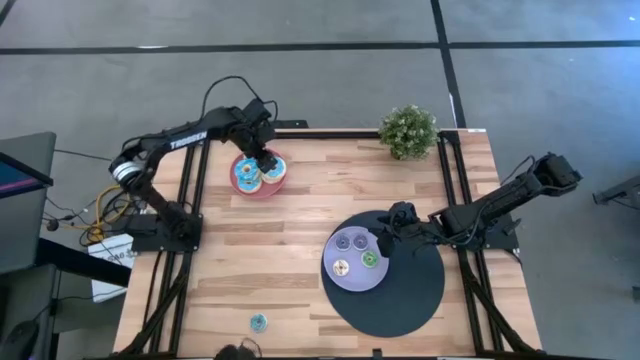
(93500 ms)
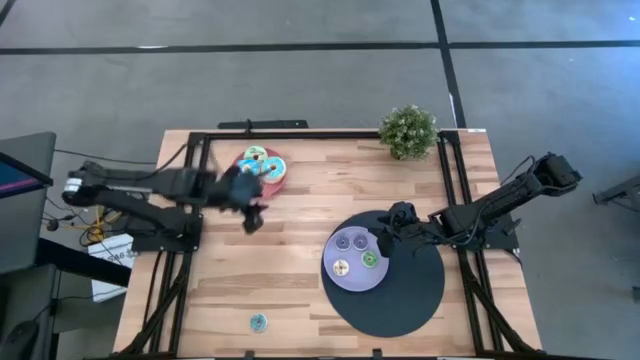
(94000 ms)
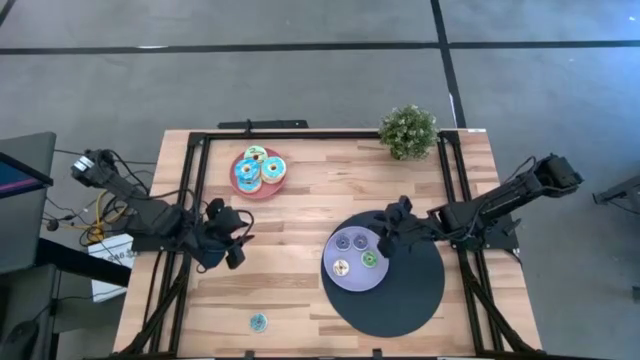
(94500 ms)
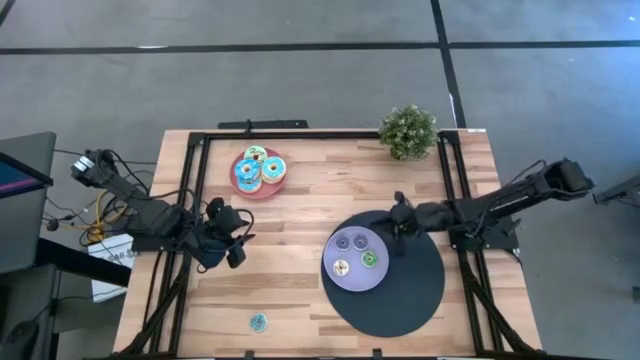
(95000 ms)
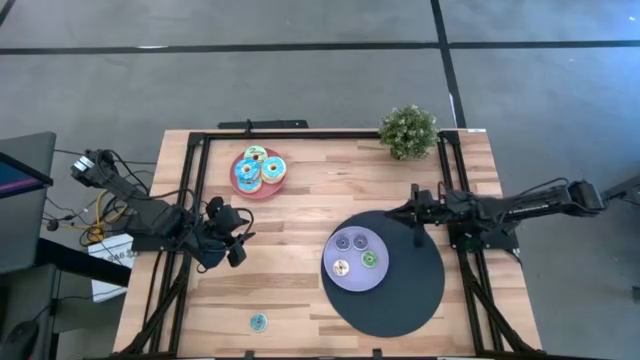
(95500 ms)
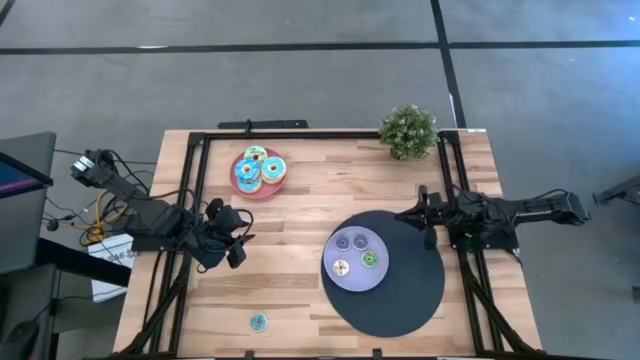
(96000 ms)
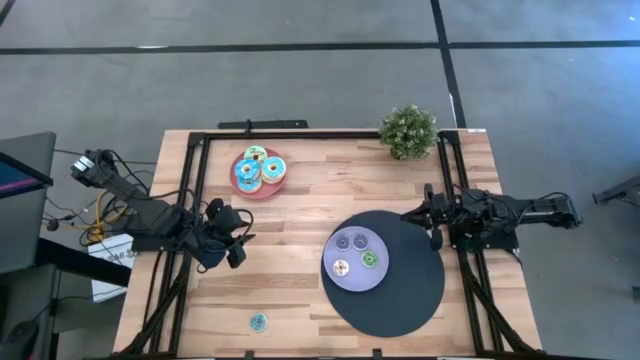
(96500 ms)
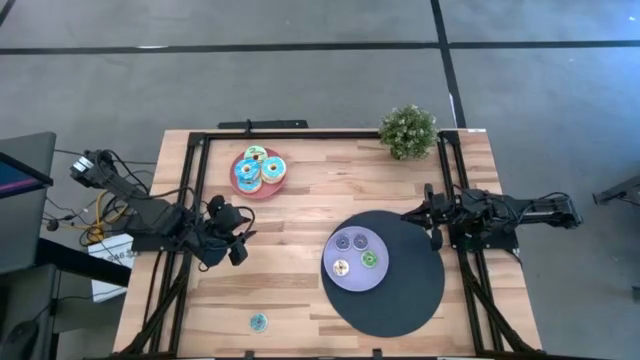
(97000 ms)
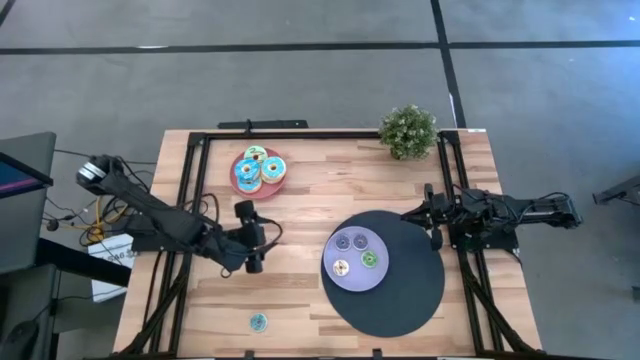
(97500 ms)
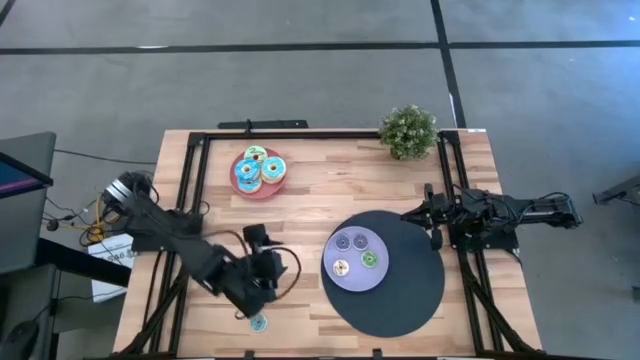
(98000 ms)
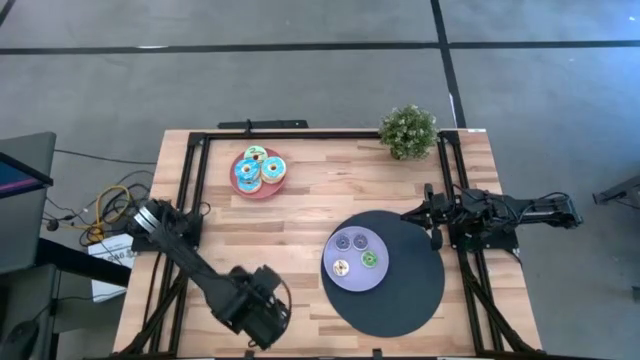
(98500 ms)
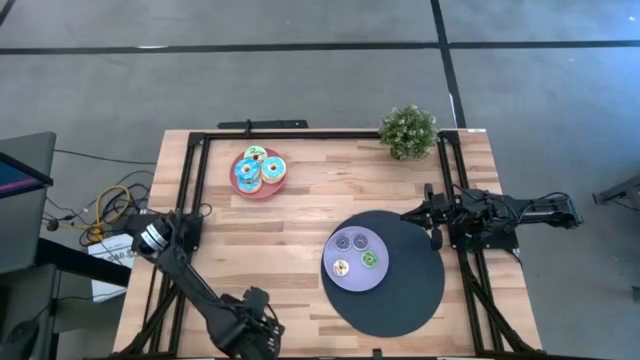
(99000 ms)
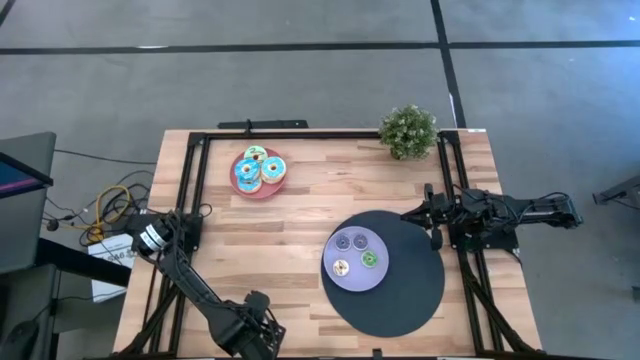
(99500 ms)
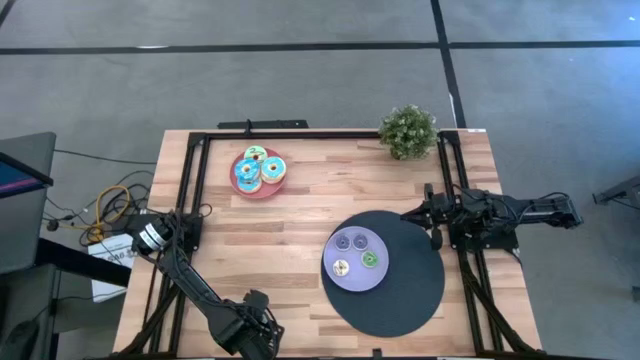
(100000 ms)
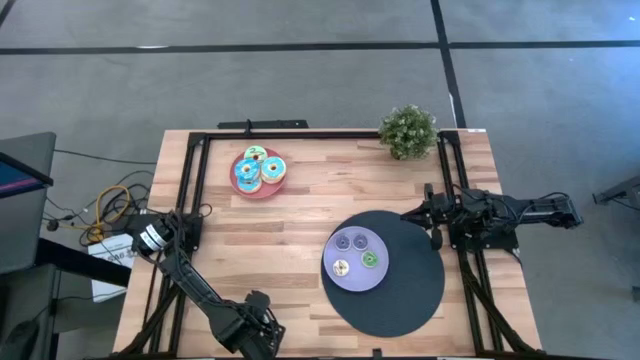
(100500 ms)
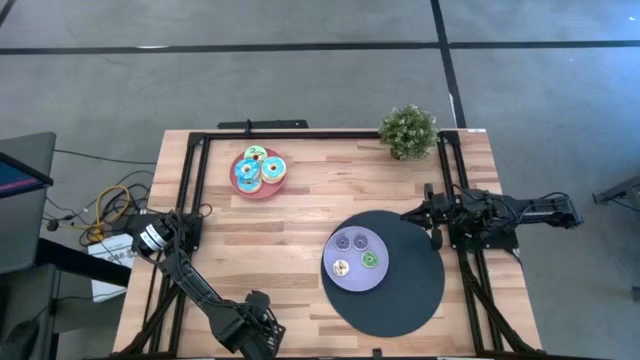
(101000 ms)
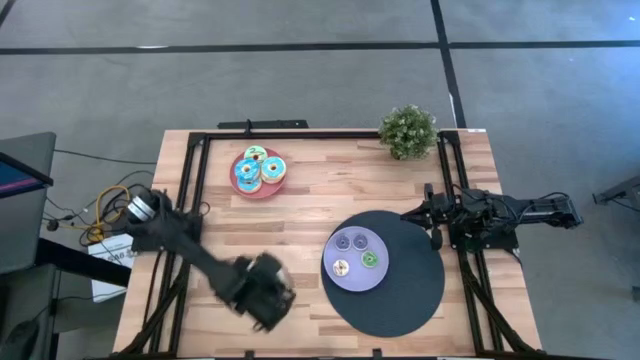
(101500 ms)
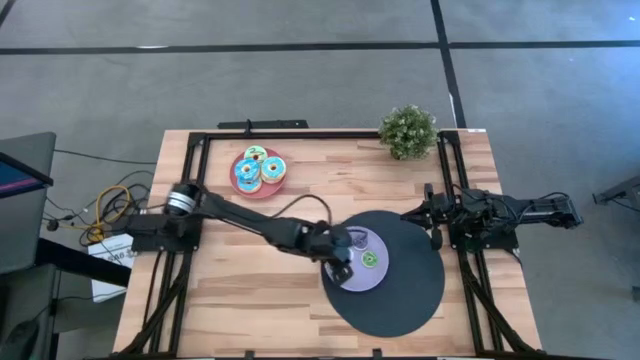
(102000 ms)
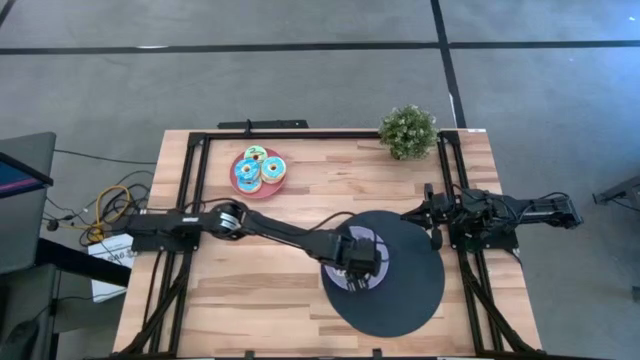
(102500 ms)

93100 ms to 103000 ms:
Task: Pick & Place donuts
Put the small blue donut on the purple plate

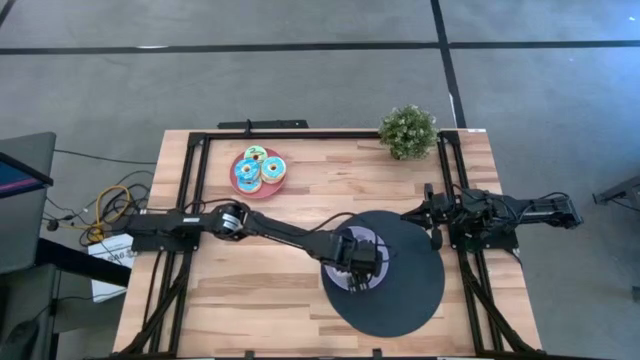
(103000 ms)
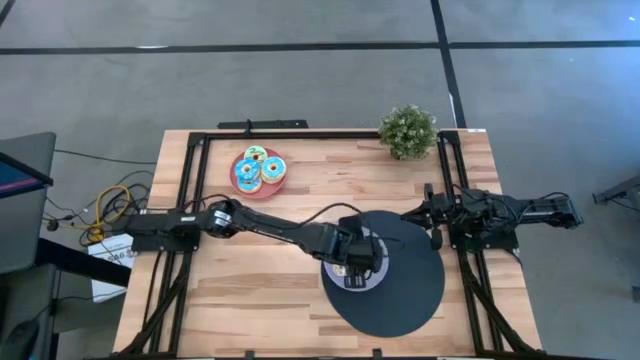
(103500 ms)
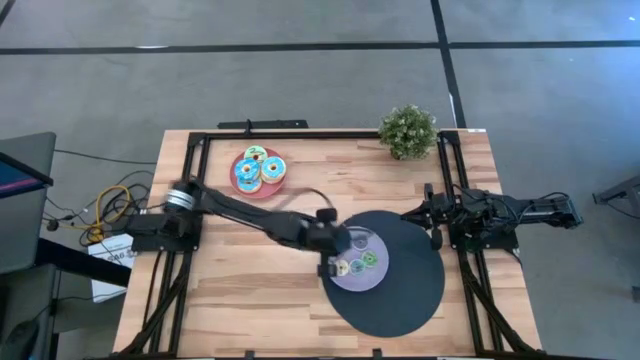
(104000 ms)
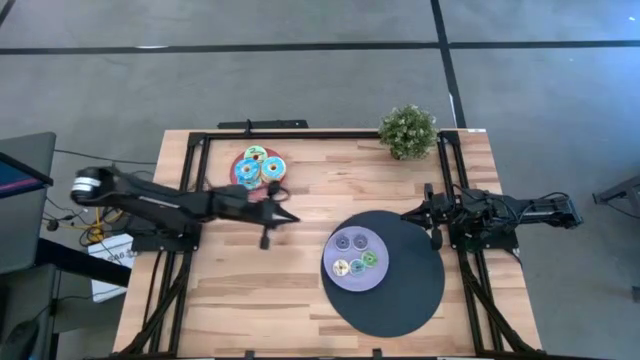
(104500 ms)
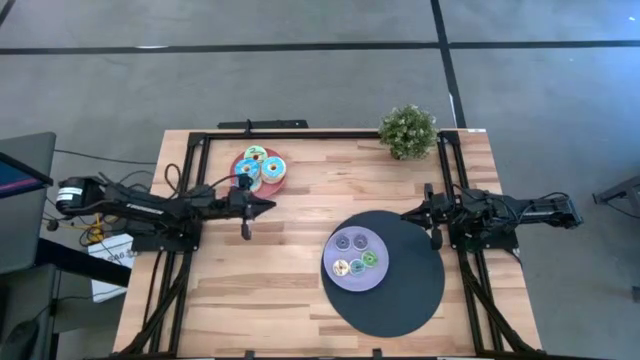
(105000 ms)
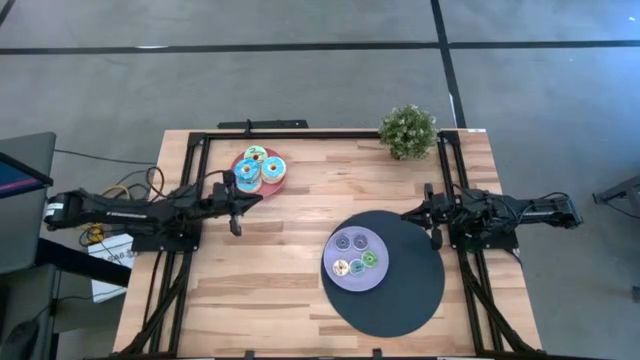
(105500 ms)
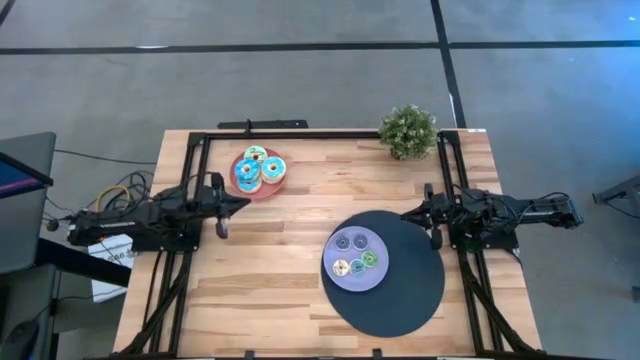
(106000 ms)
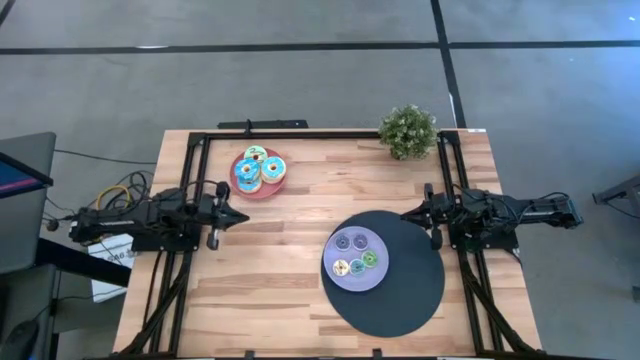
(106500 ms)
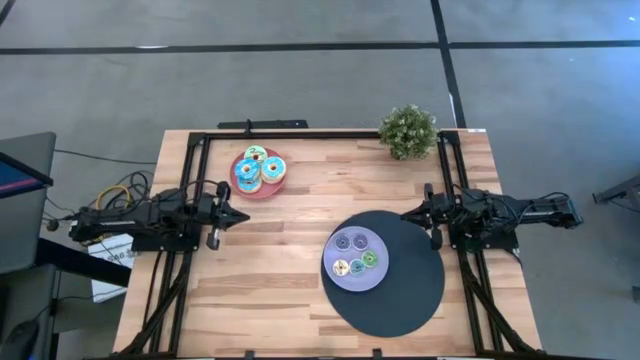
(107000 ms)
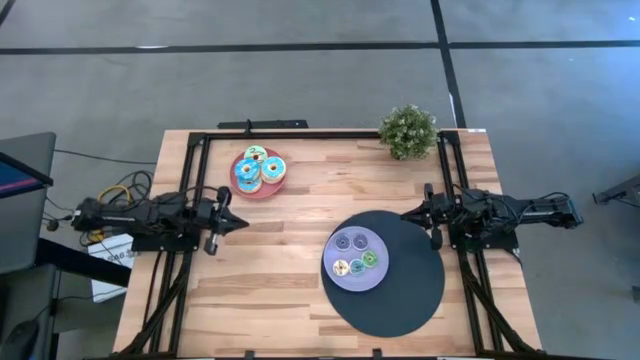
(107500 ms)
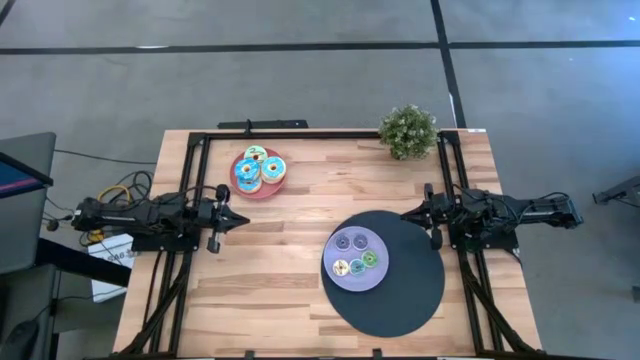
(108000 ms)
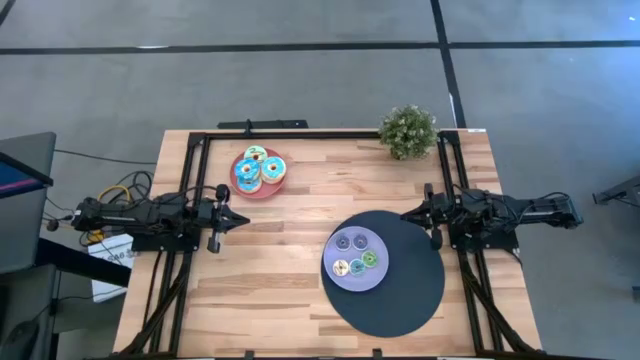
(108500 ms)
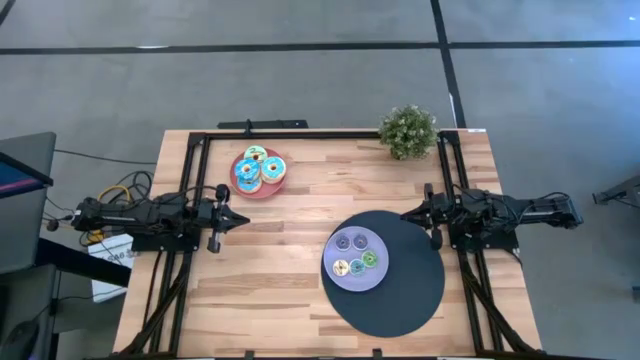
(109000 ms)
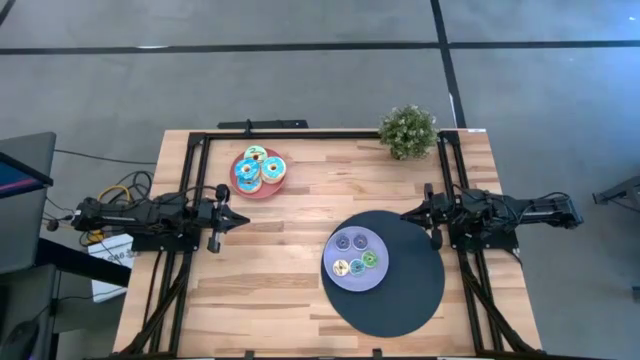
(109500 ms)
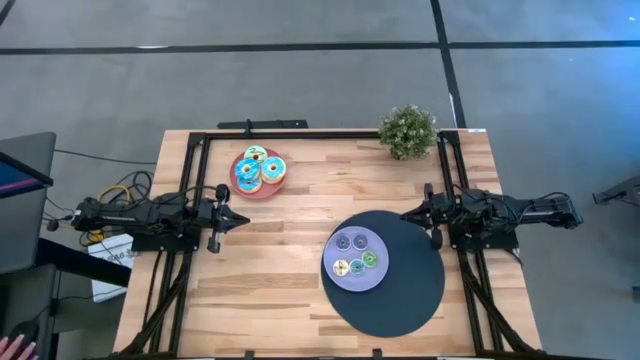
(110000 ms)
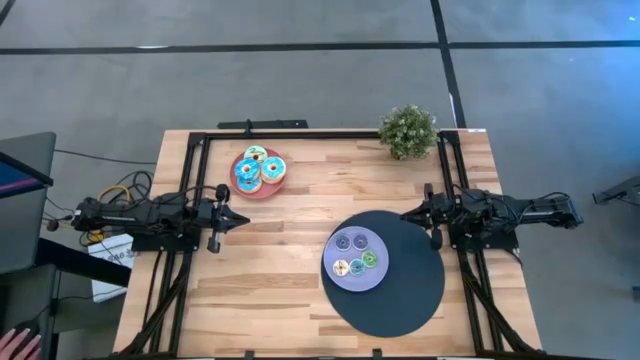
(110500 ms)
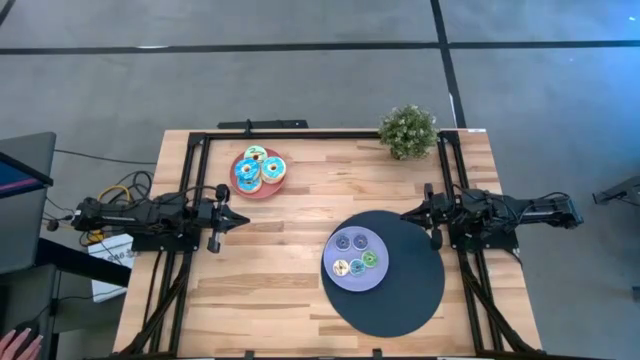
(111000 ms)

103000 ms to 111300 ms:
Return to Home Position

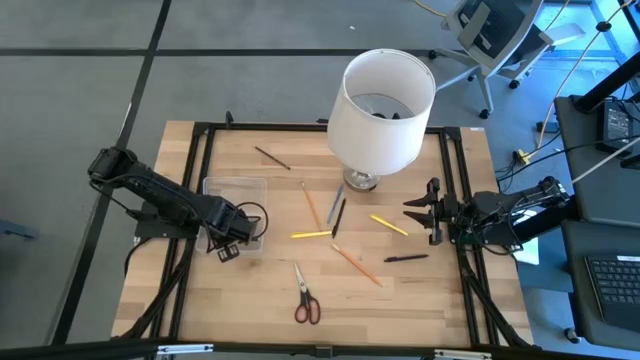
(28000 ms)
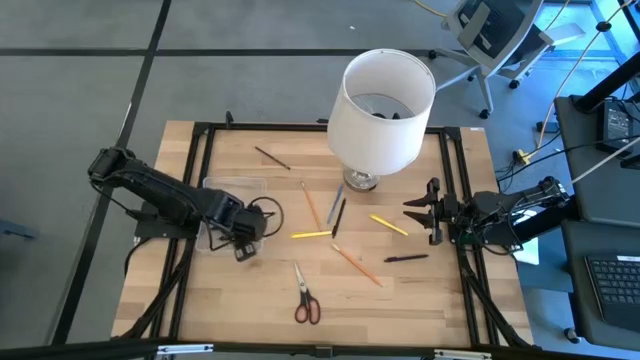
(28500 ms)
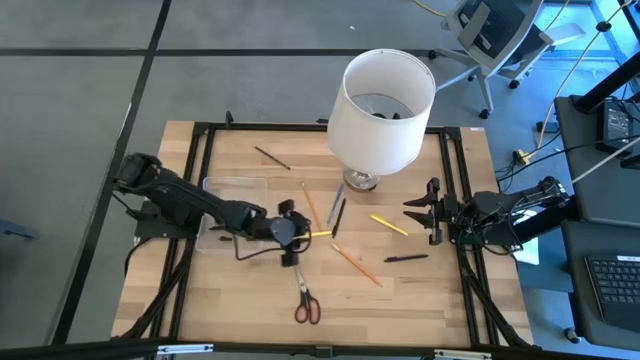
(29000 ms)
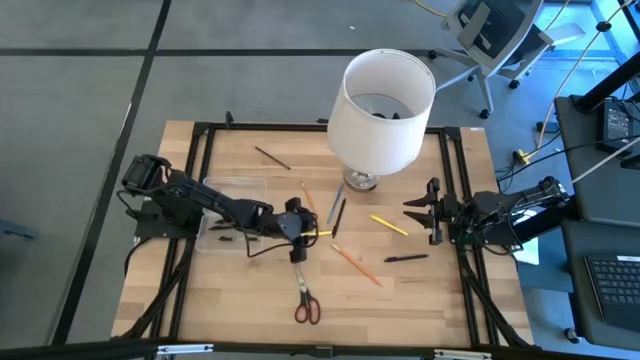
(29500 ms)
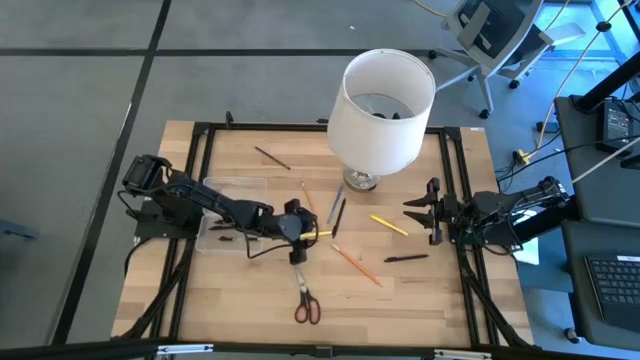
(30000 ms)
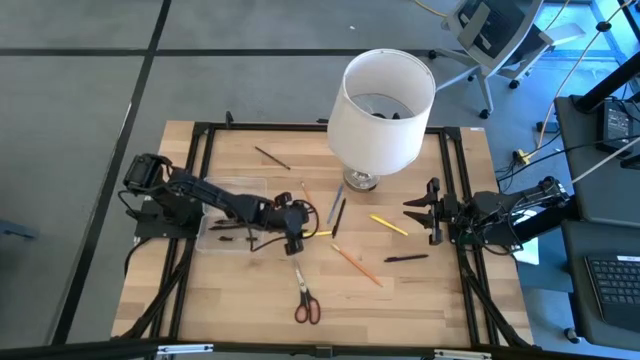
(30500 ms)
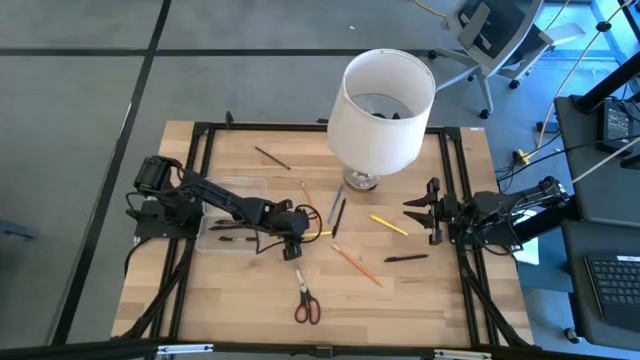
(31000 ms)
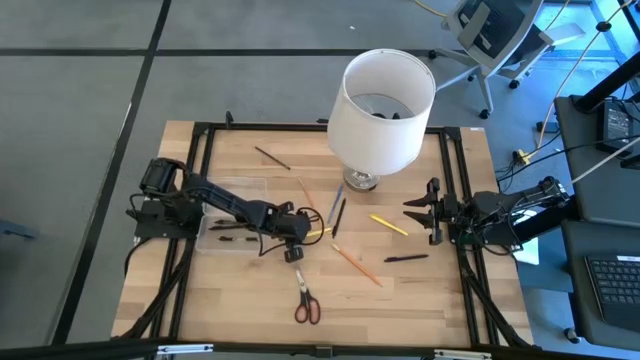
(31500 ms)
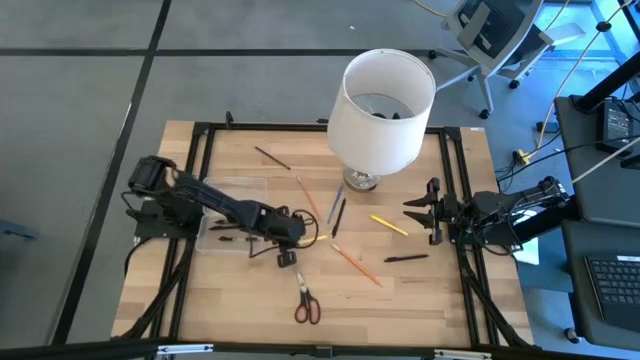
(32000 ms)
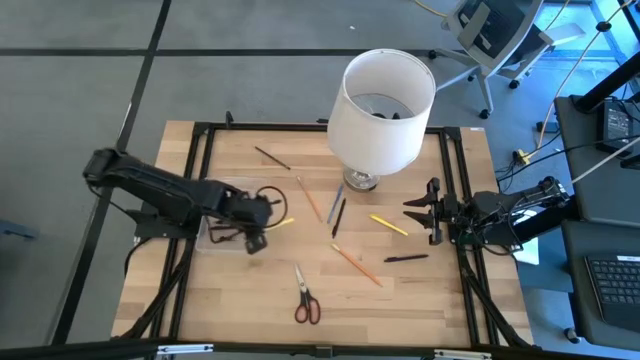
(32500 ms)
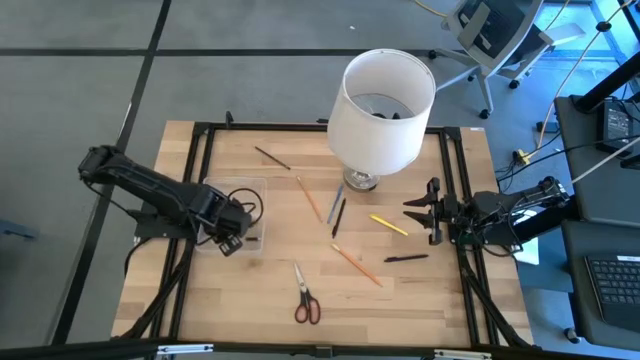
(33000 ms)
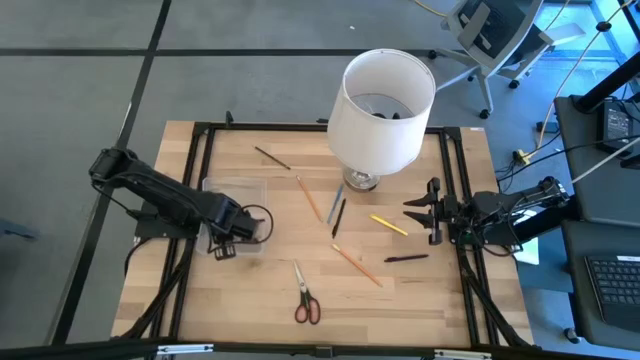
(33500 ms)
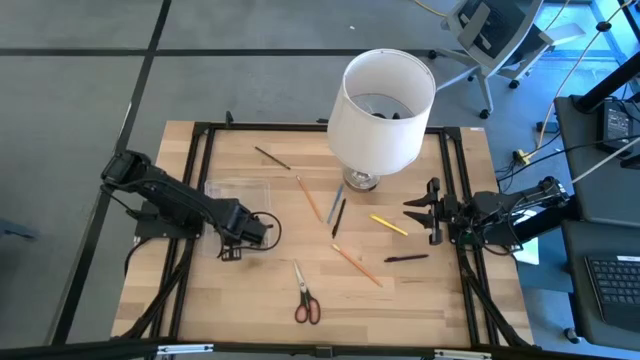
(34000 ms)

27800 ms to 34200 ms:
Task: Pick & place school supplies into a supply box
Put the yellow pen into the transparent supply box
